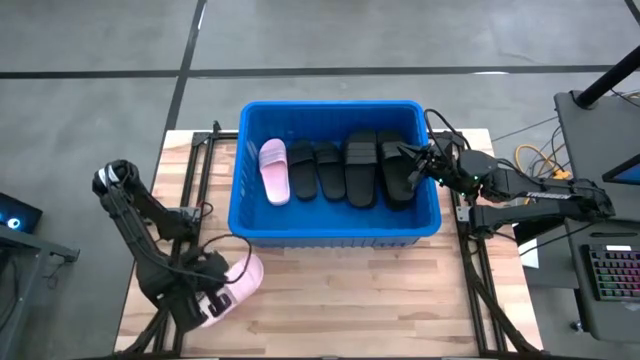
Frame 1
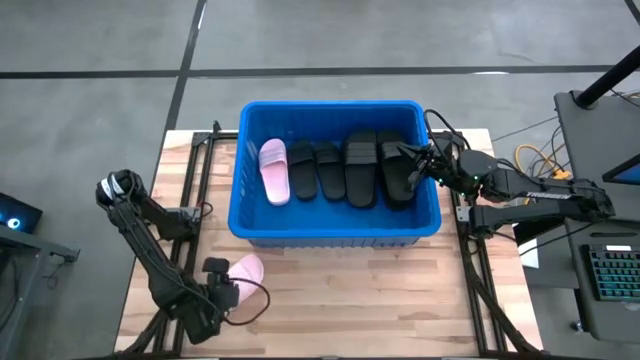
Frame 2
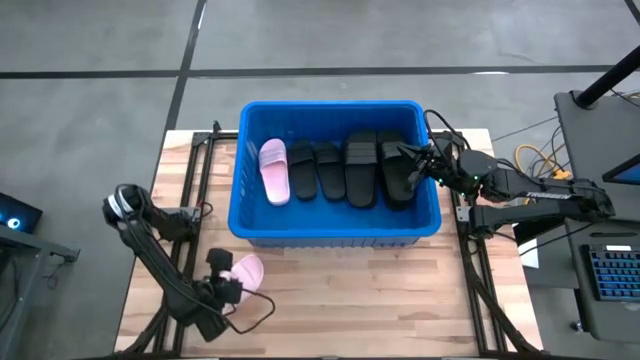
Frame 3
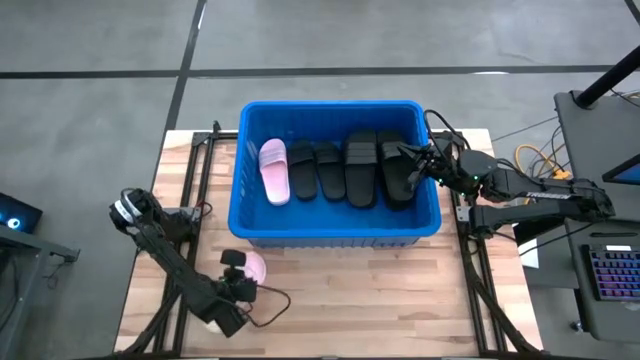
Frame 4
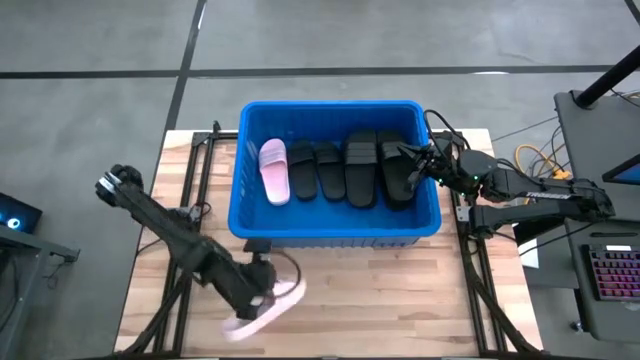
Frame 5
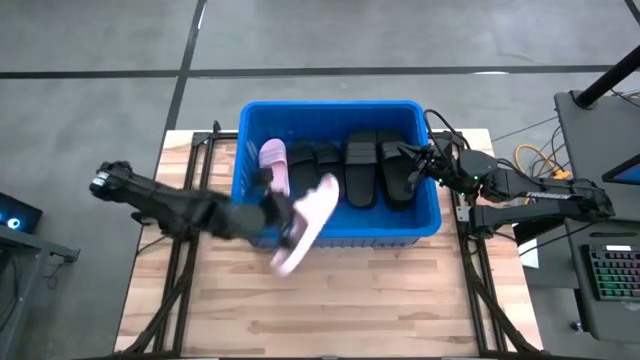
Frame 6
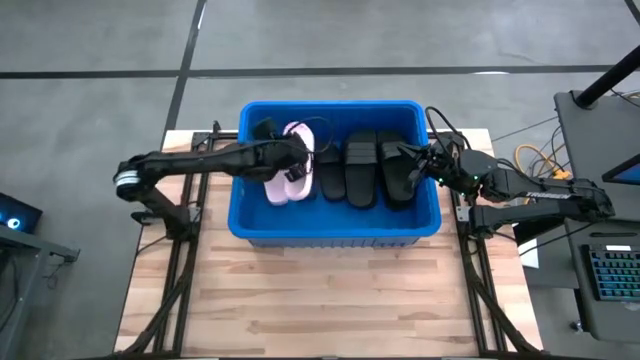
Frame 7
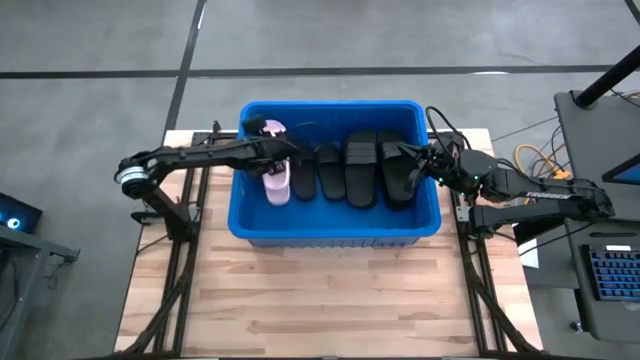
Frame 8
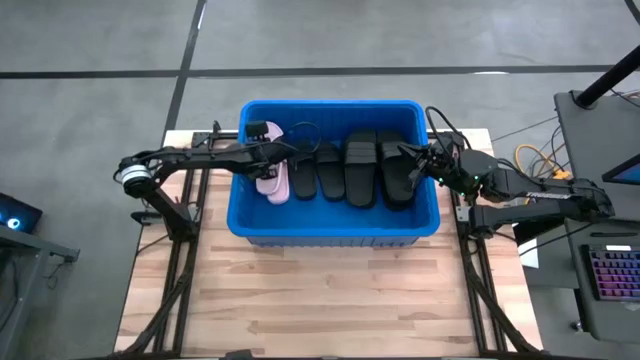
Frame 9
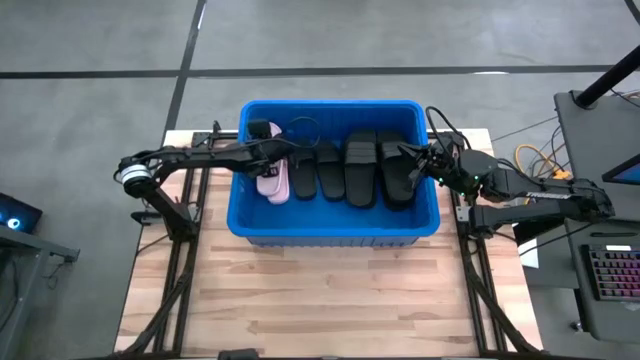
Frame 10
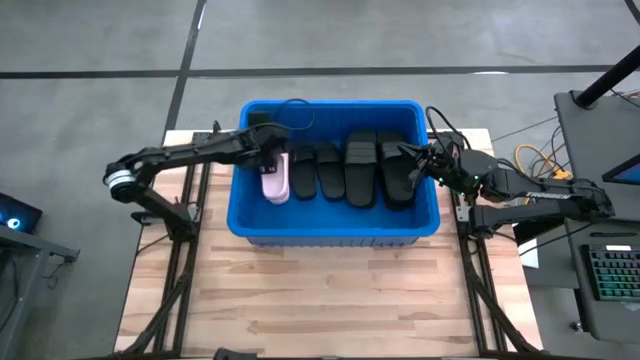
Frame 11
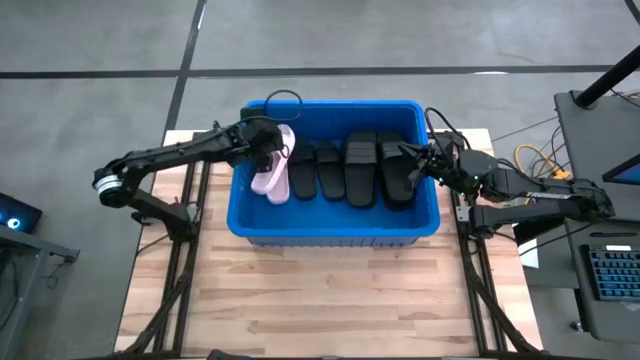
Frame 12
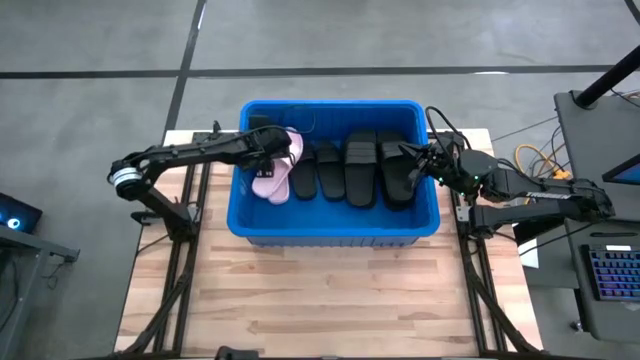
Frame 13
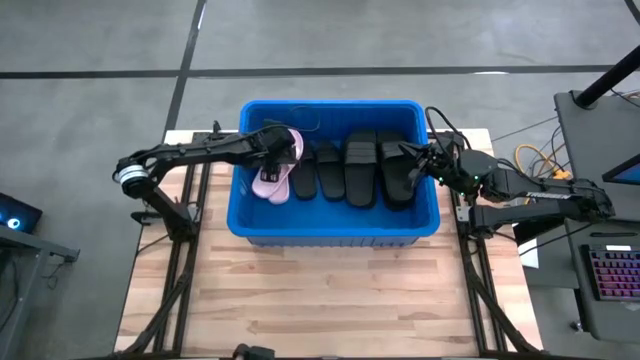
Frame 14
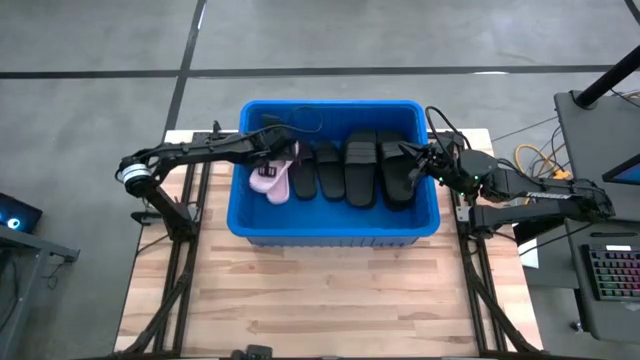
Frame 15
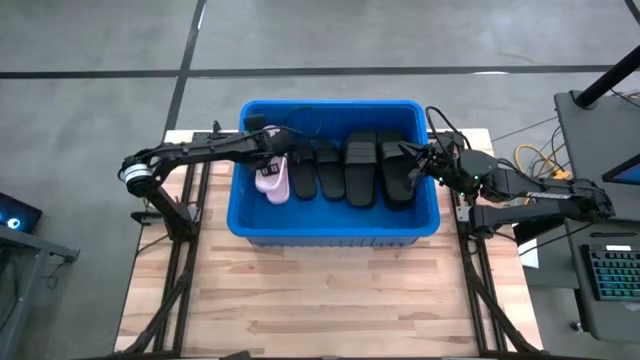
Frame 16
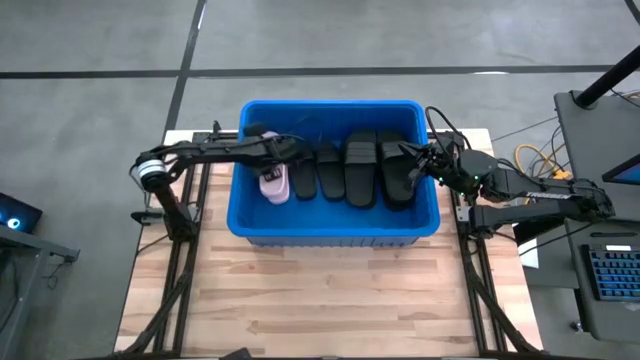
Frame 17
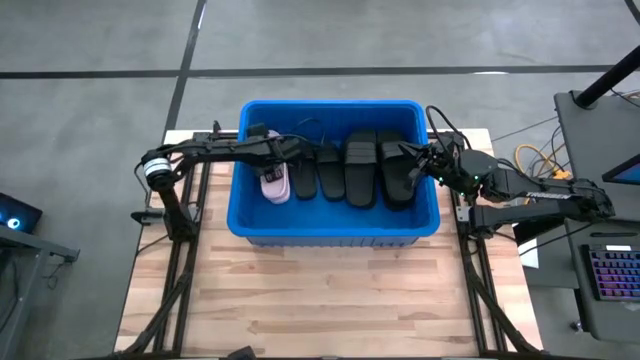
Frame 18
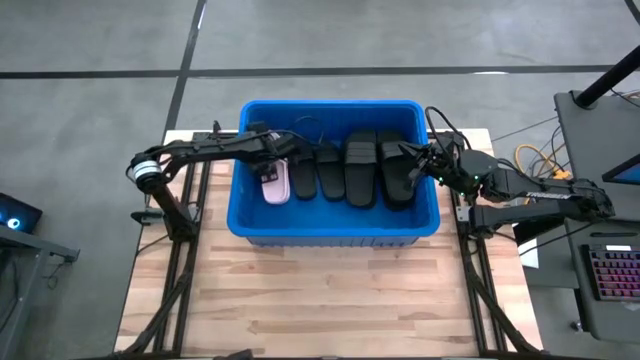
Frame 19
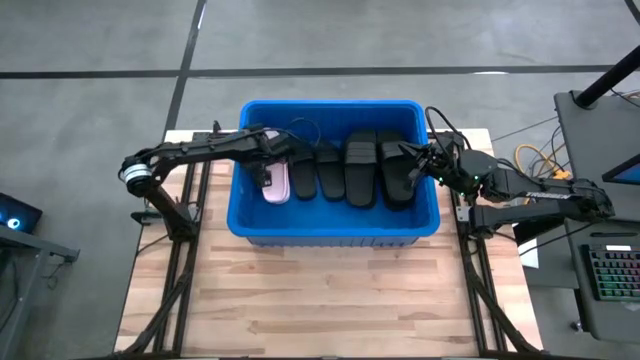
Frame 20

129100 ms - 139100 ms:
Task: Pick and place slides into bin
Put the pink slide into the bin

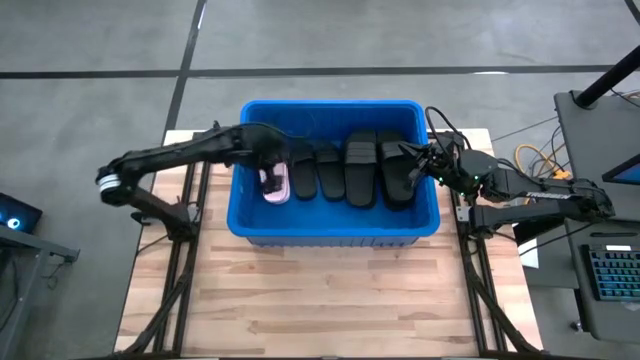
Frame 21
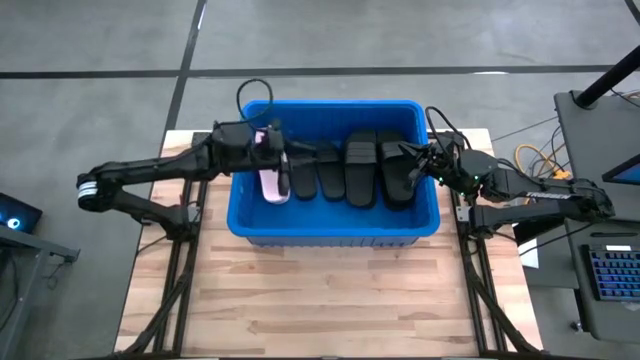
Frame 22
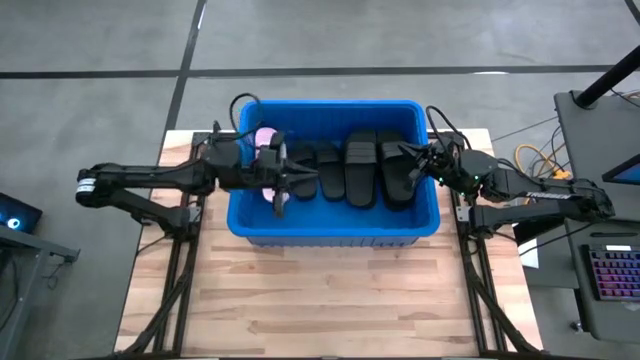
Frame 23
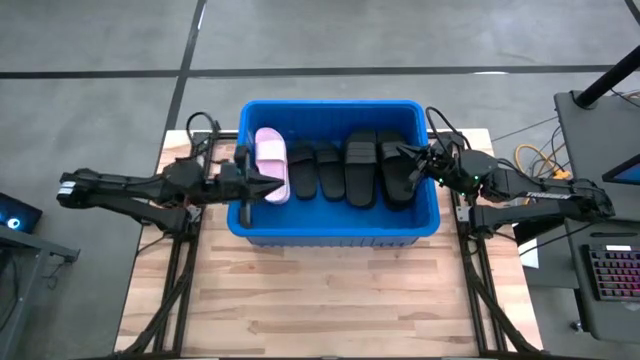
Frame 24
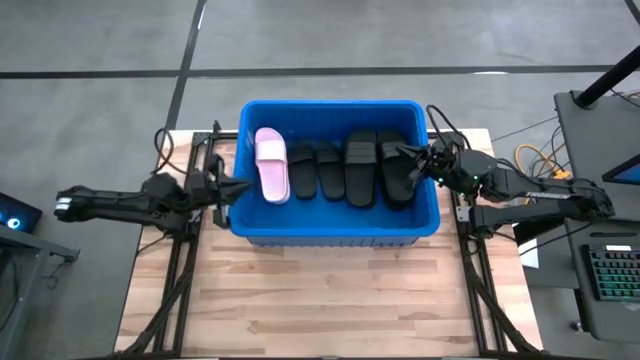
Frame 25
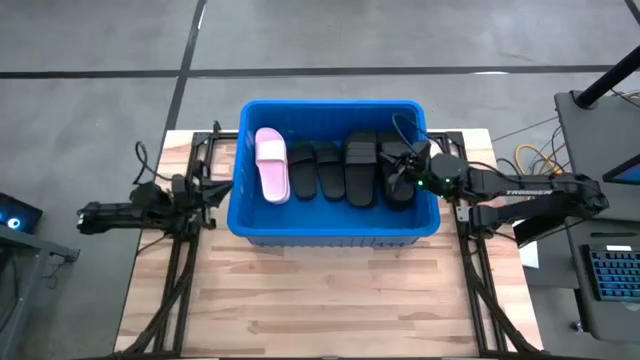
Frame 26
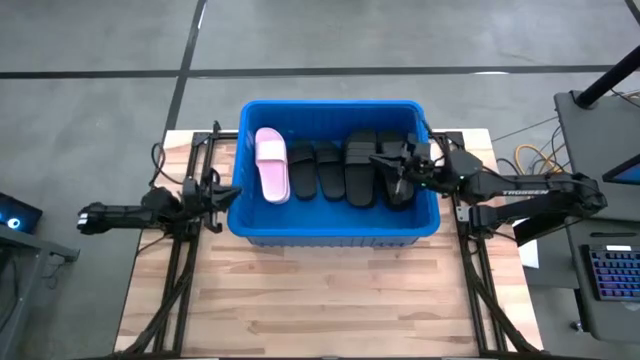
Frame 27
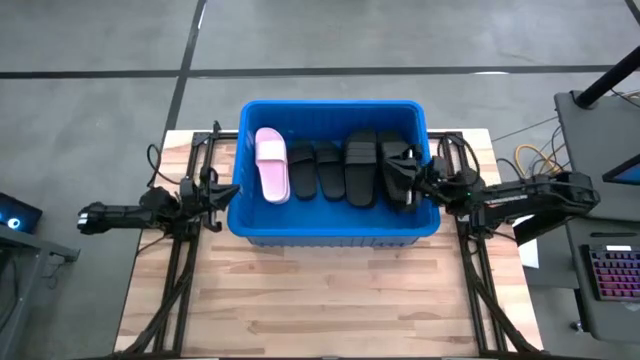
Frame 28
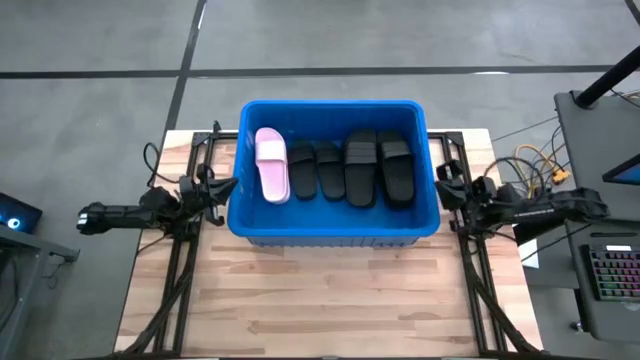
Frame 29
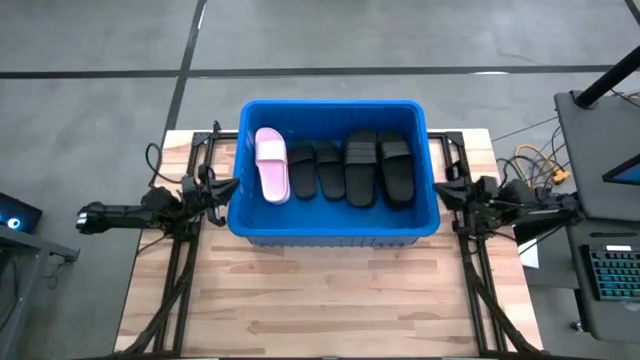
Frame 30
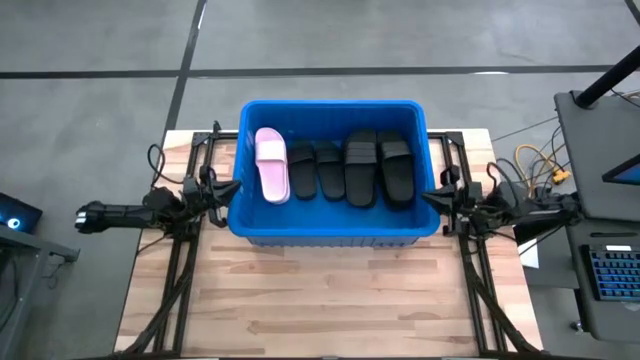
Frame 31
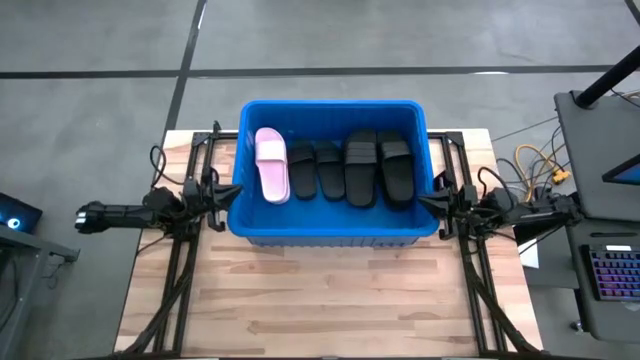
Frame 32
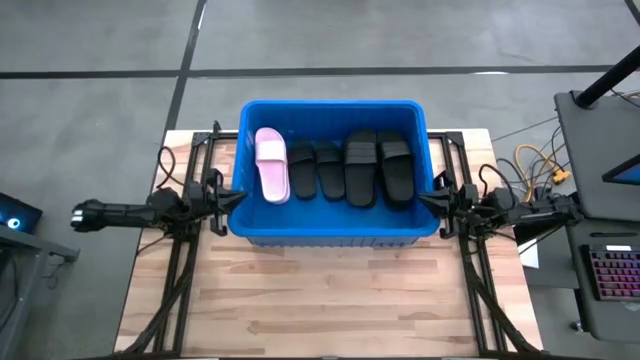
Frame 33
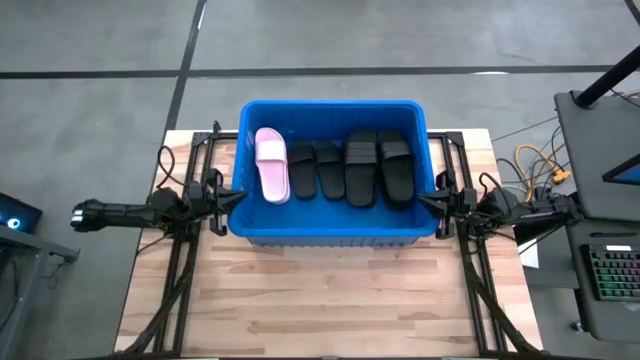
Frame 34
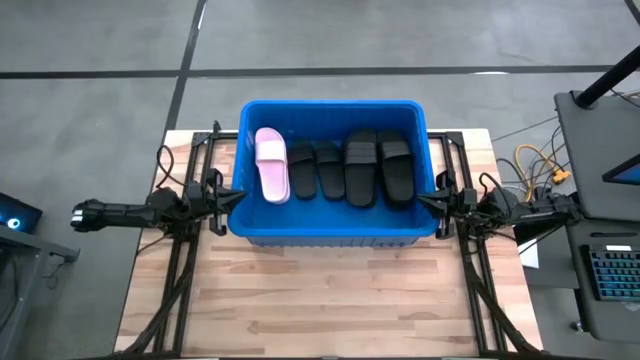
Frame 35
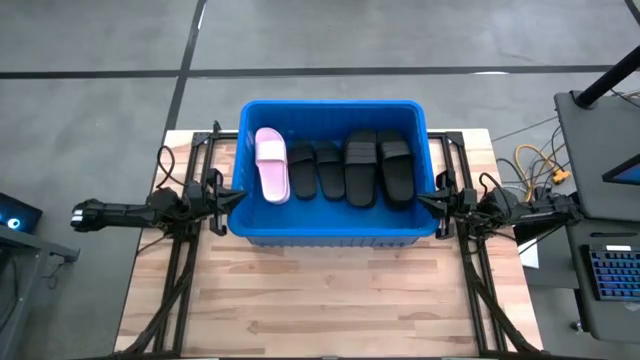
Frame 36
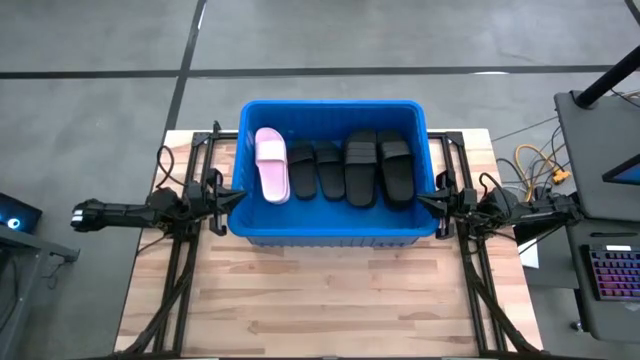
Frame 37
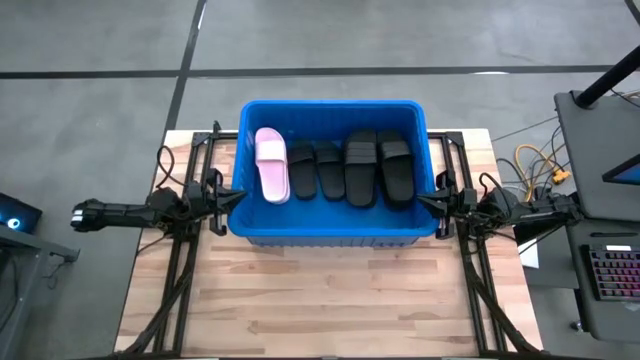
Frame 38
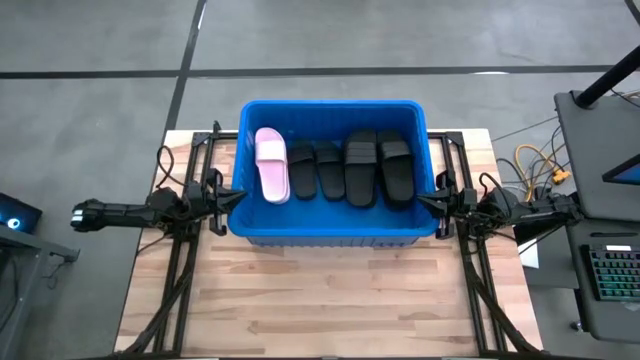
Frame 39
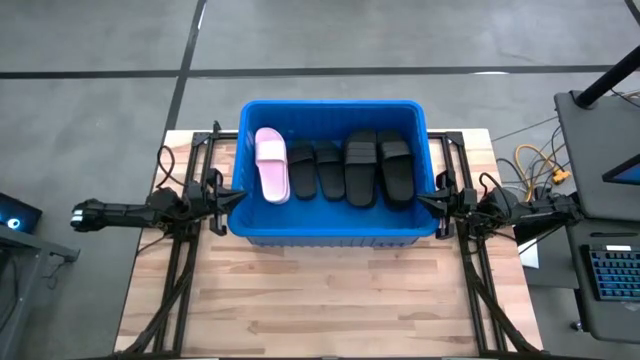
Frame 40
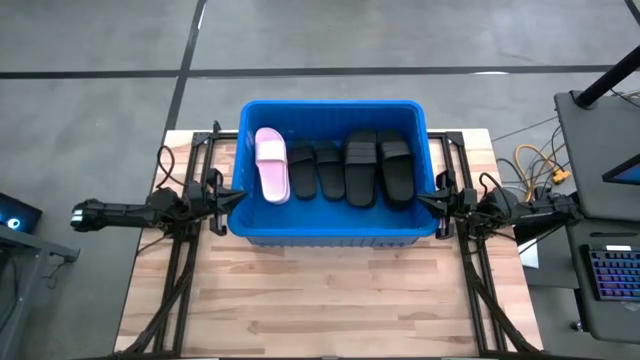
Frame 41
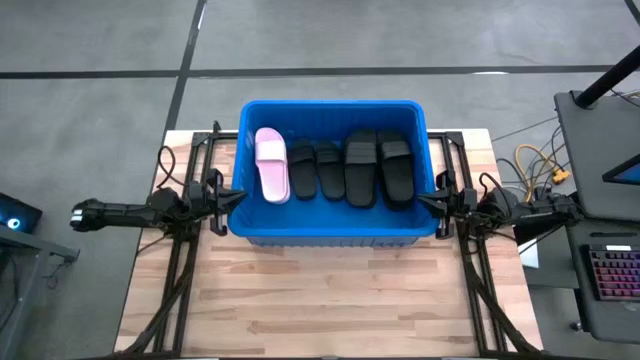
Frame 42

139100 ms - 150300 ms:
Return to Home Position
